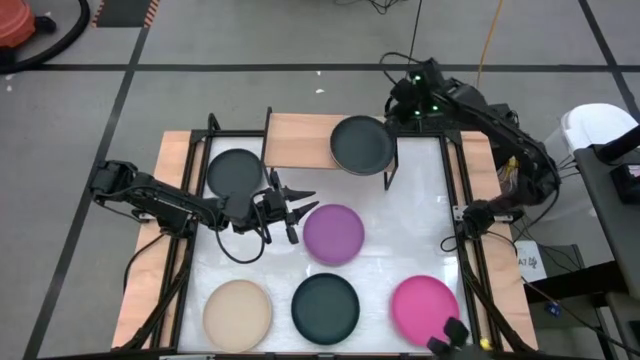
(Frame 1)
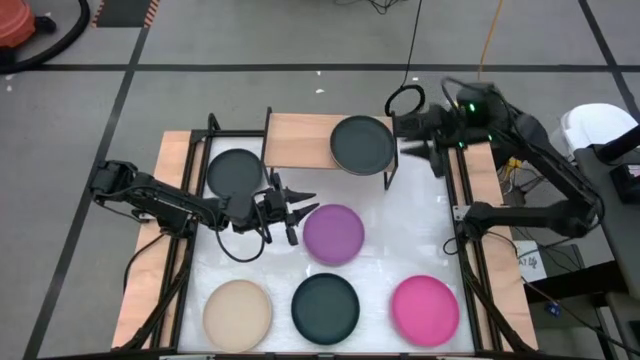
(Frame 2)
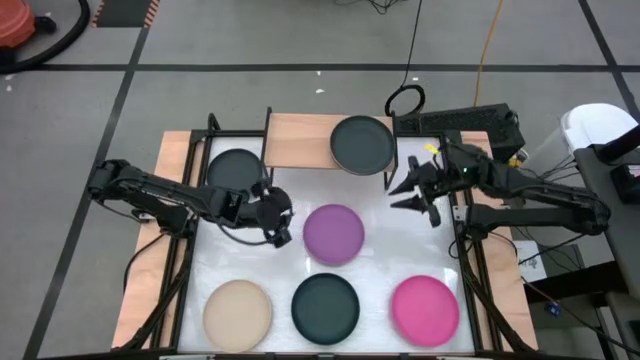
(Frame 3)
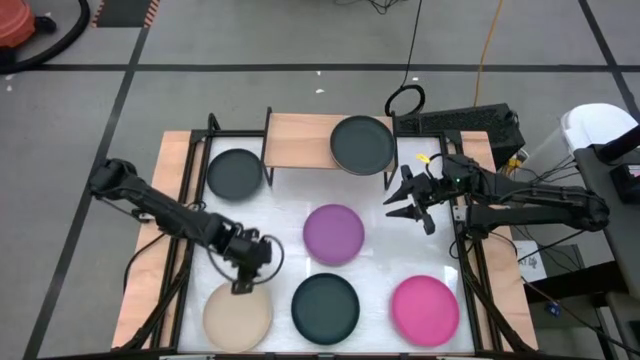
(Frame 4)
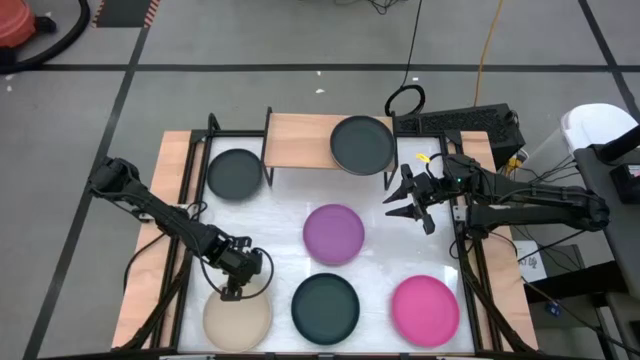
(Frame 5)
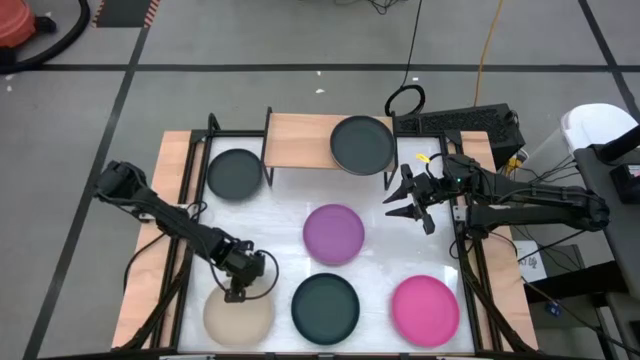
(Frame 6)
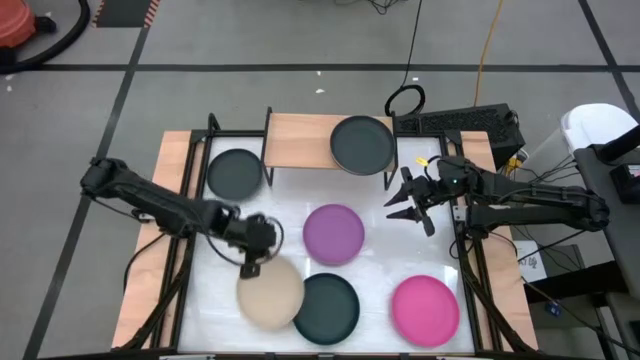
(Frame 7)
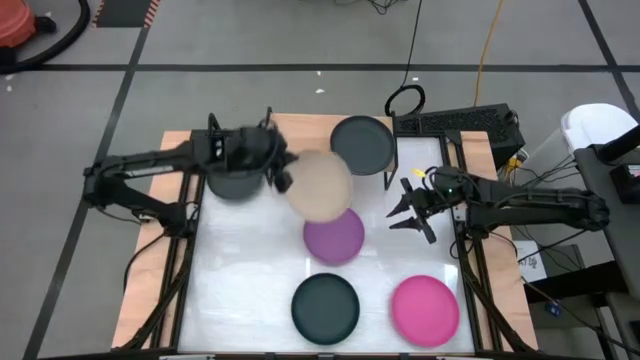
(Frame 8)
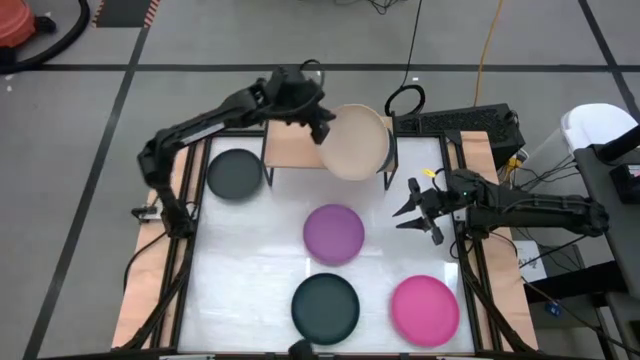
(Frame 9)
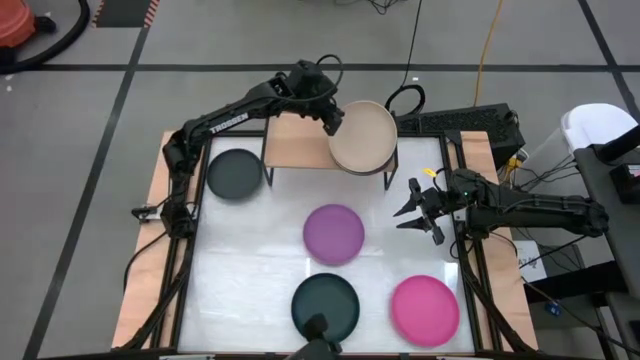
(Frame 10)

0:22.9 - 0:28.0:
Task: Place and stack plates onto a shelf
Stack the white plate on top of the black plate on the shelf

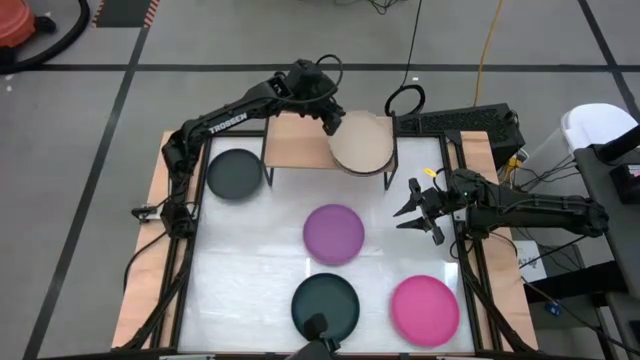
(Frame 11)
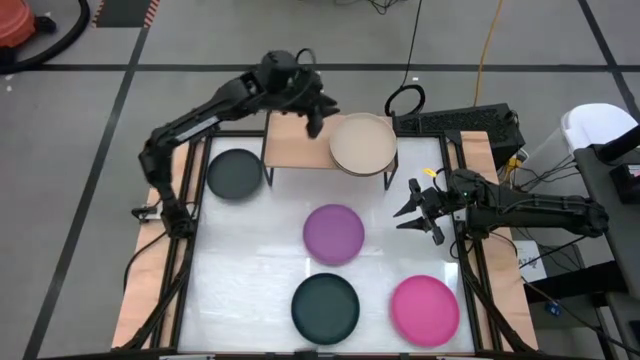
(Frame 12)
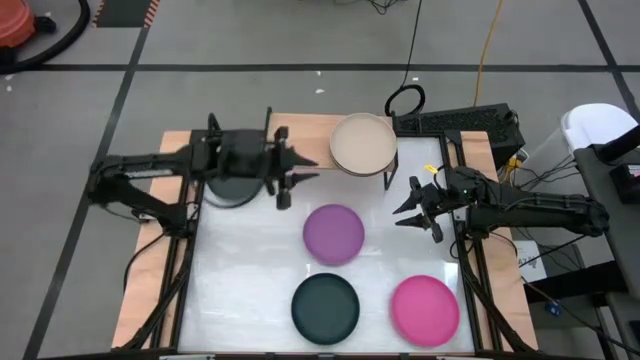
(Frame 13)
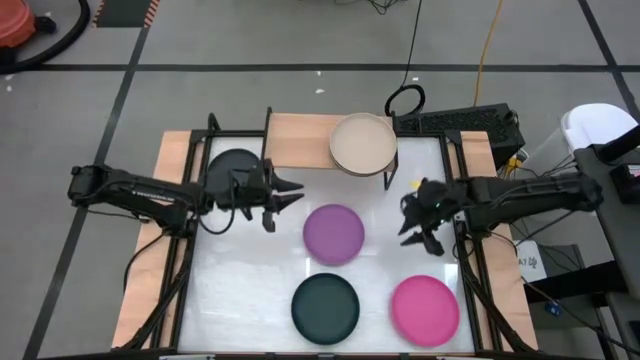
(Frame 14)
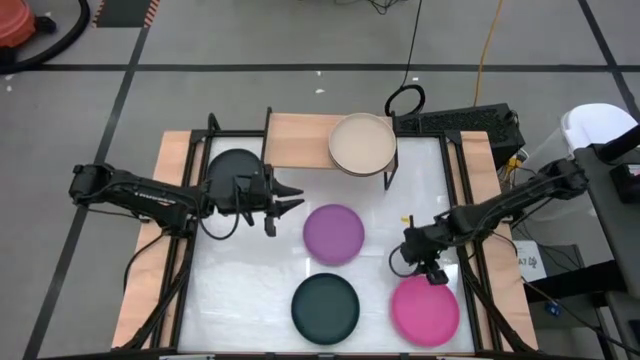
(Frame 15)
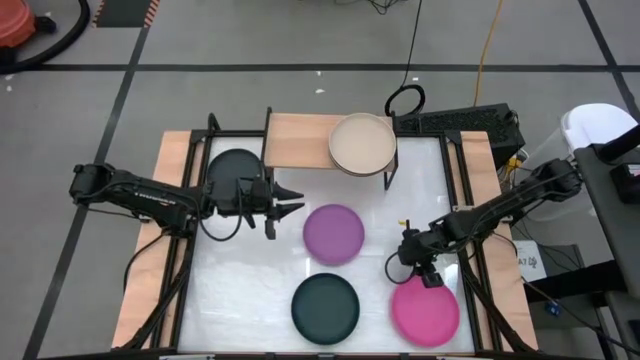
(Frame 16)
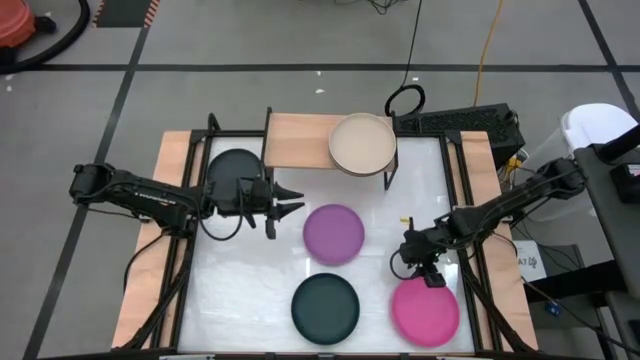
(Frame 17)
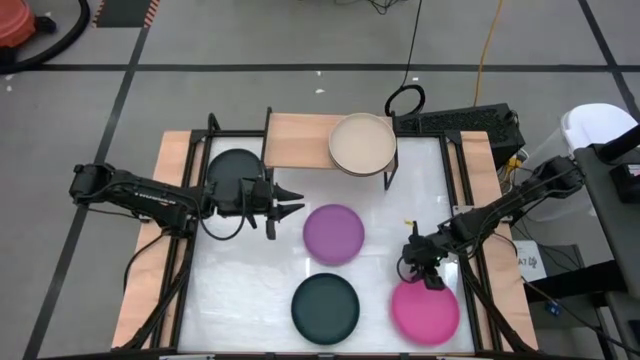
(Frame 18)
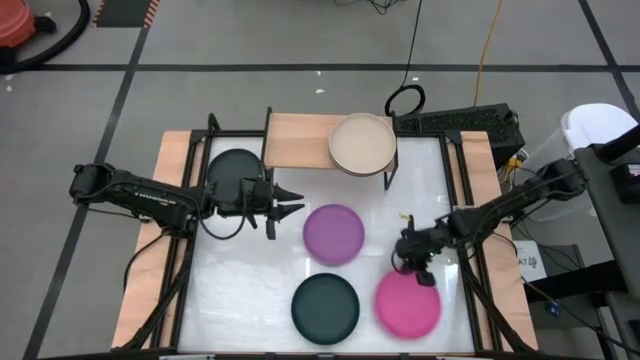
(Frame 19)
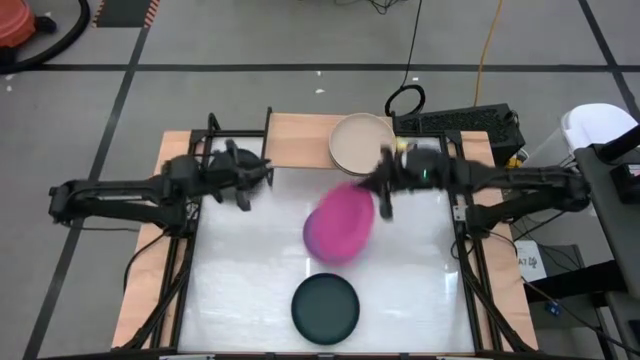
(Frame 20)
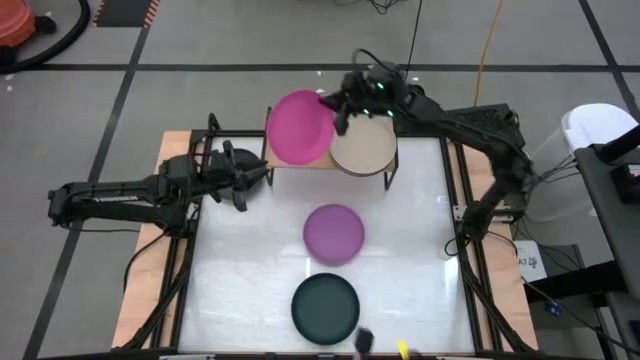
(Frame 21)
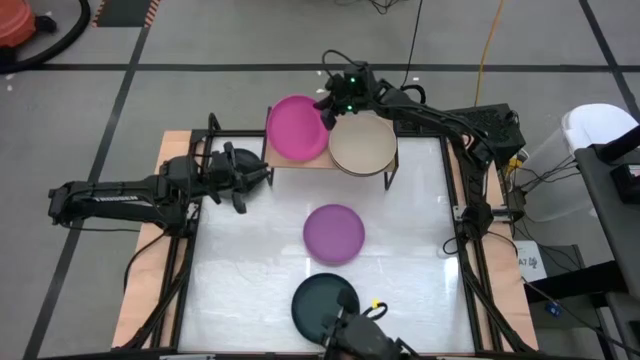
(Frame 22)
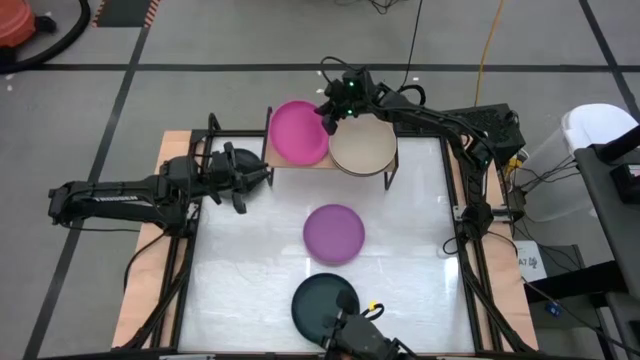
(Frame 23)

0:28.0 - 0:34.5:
Put the pink plate on the shelf

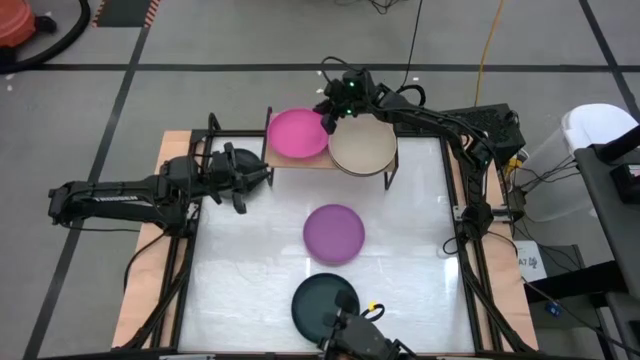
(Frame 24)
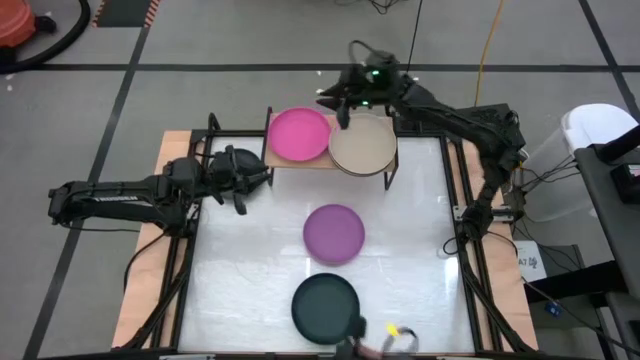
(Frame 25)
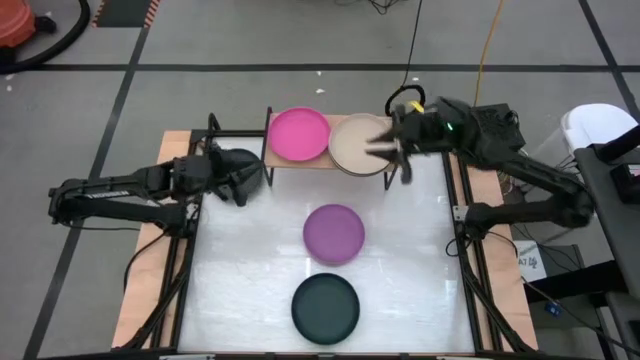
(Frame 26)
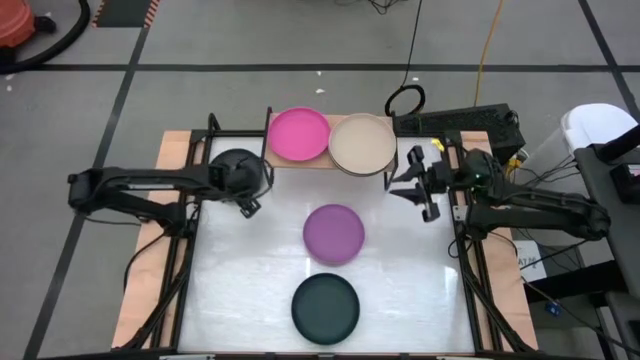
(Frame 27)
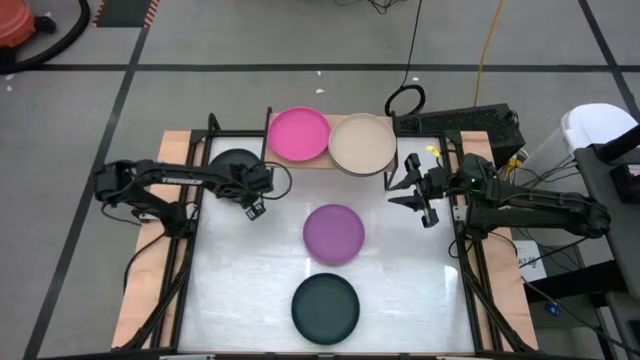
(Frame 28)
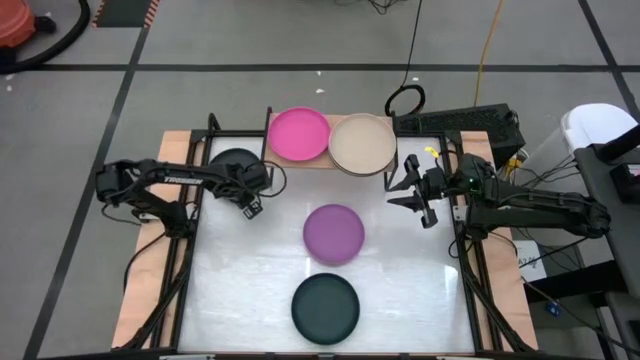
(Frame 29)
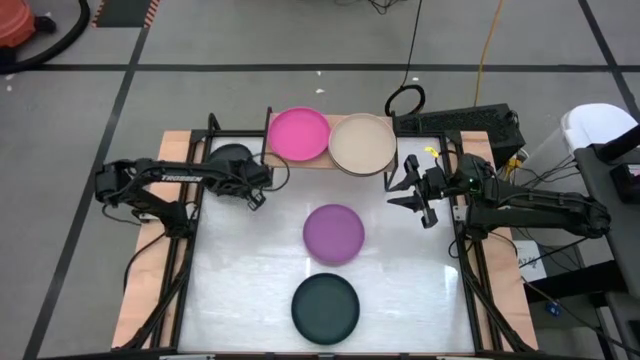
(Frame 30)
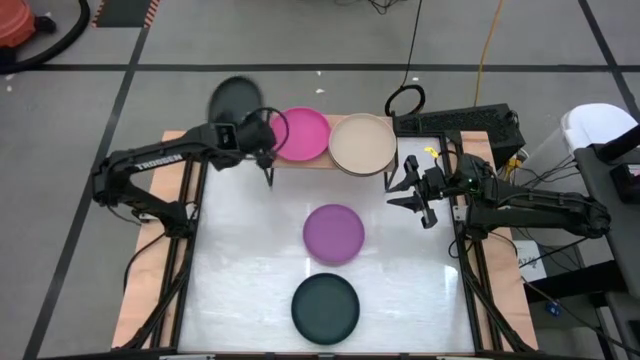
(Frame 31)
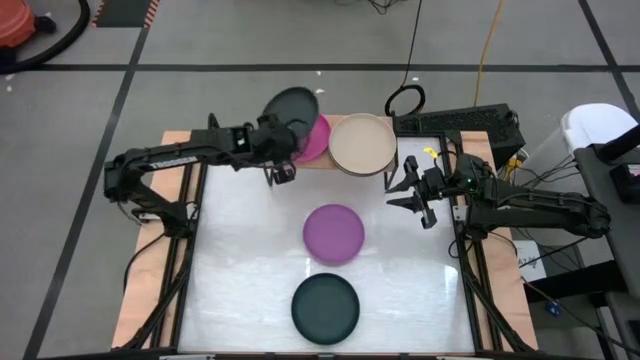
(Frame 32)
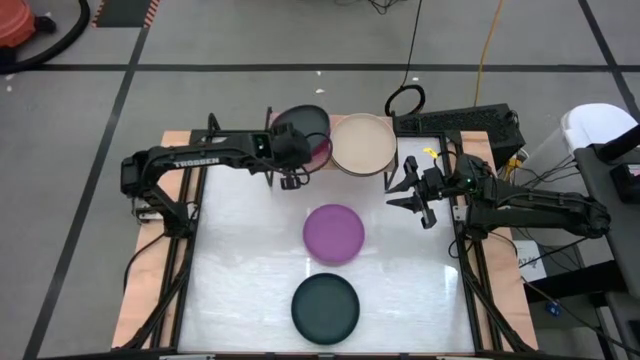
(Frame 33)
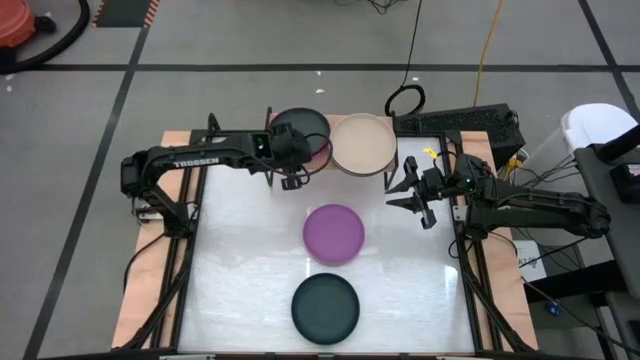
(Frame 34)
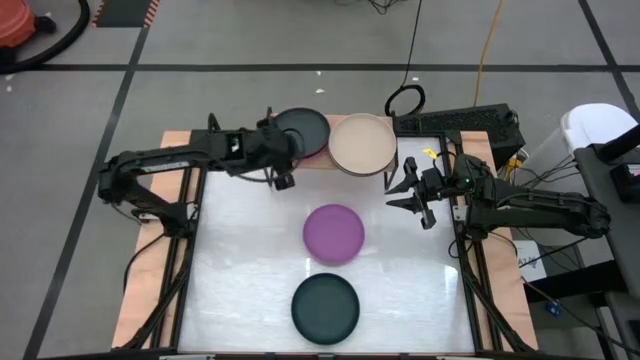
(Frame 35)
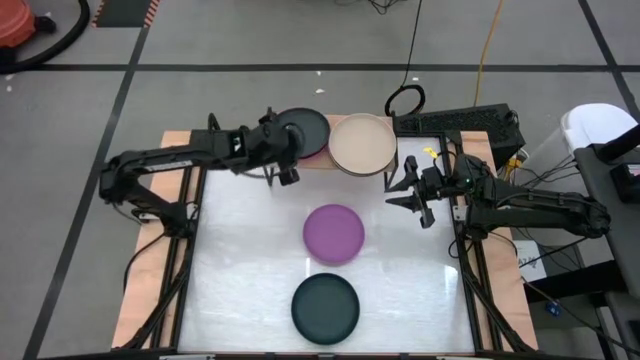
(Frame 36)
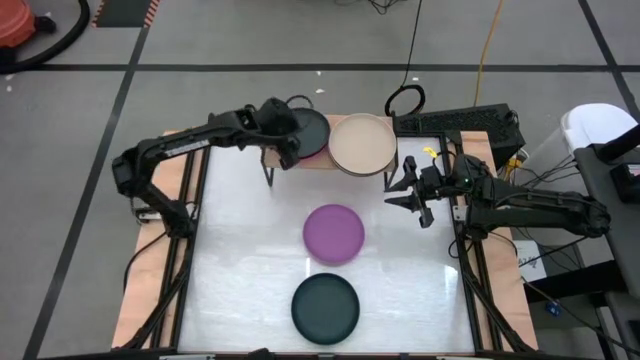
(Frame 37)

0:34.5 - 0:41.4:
Stack the black plate on top of the pink plate on the shelf

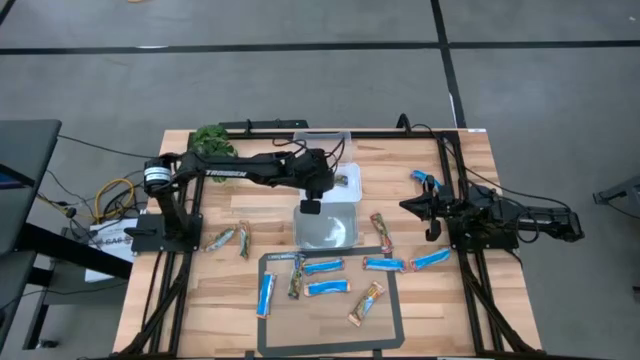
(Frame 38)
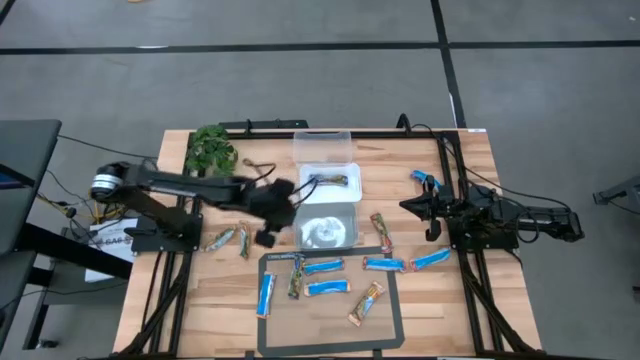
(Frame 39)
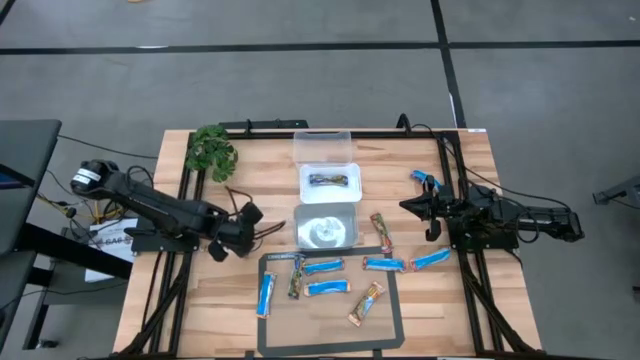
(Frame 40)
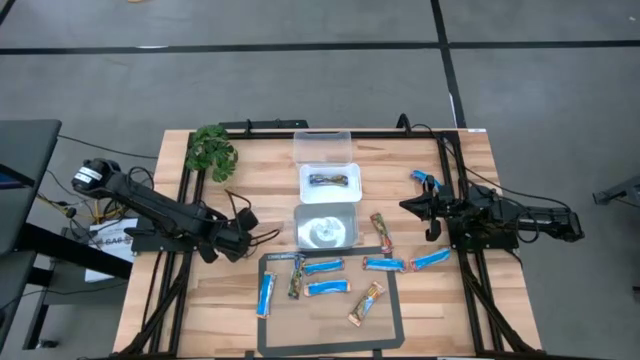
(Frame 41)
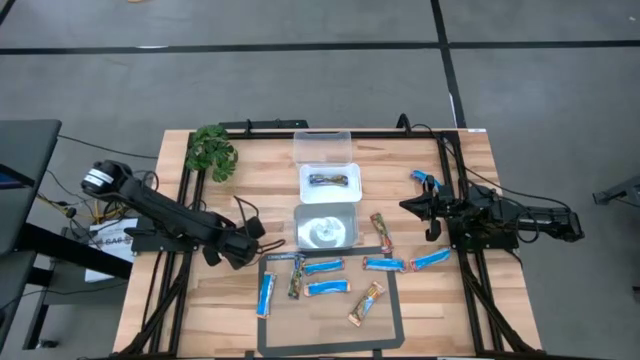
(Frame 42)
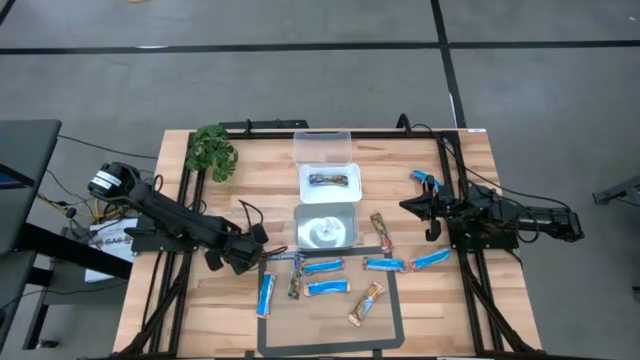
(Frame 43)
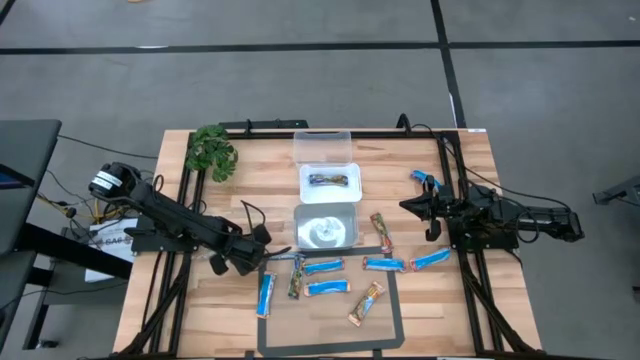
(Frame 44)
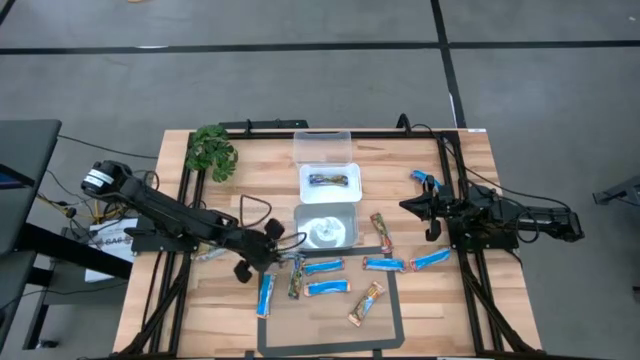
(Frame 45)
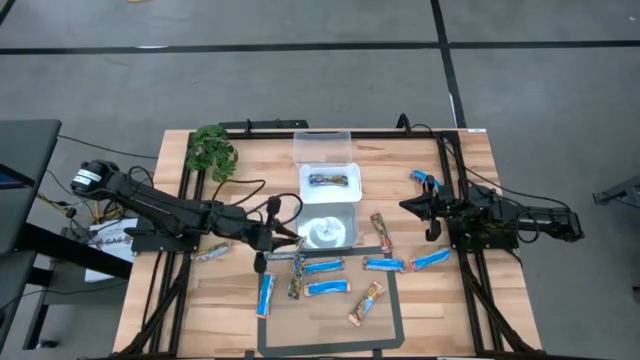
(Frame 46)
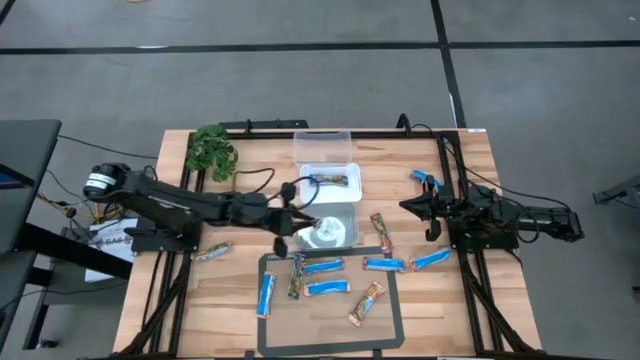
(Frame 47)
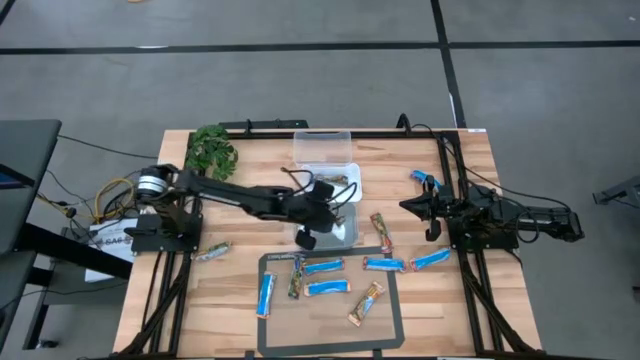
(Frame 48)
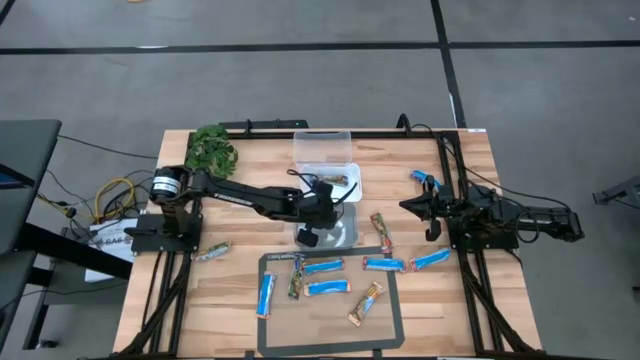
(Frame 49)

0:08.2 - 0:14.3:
Task: Pick and place Granola Bars by type
Put the yellow granola bar into the gray bin
